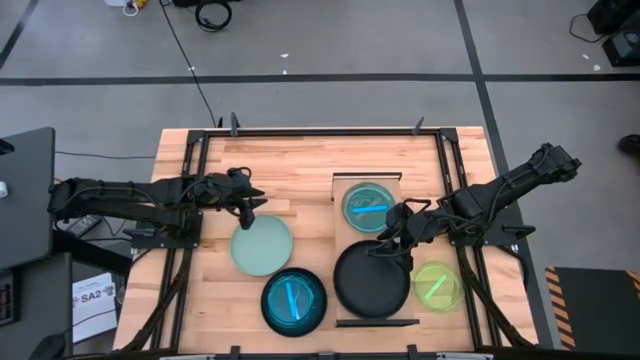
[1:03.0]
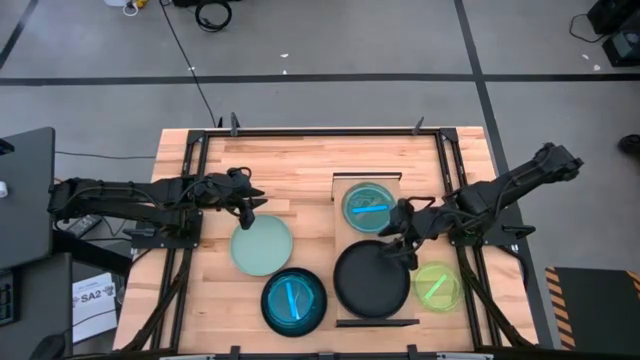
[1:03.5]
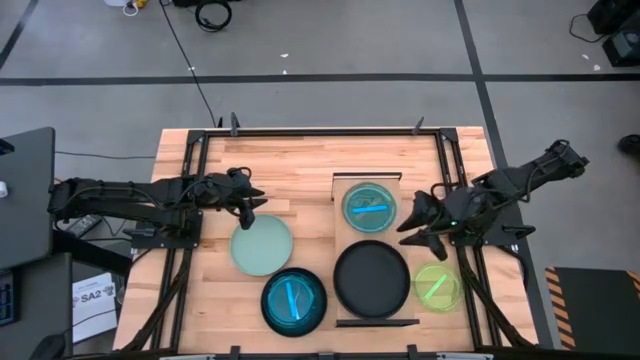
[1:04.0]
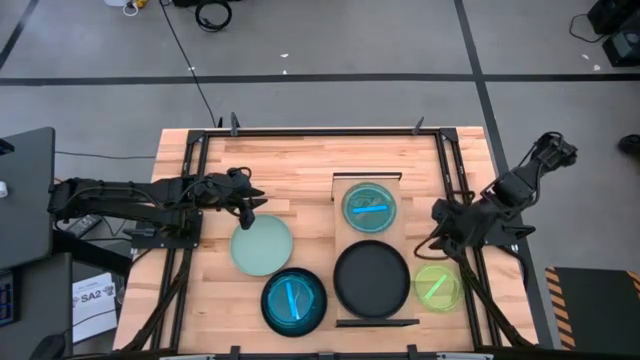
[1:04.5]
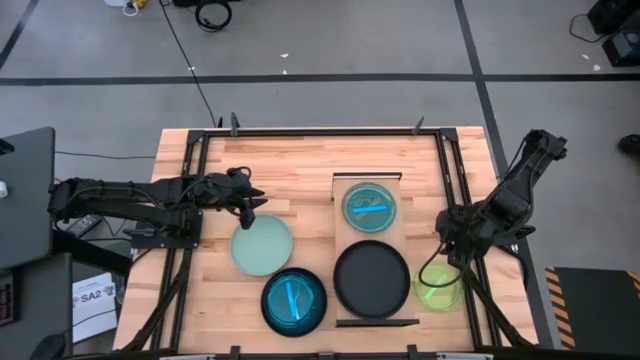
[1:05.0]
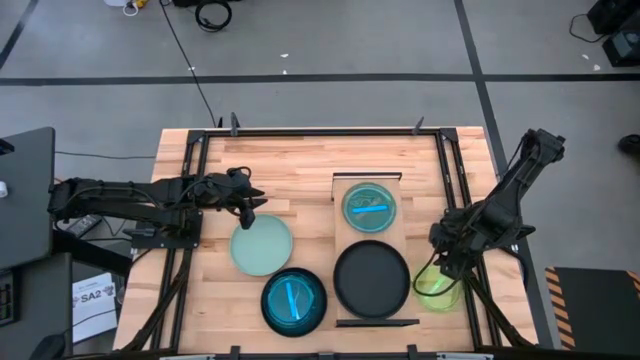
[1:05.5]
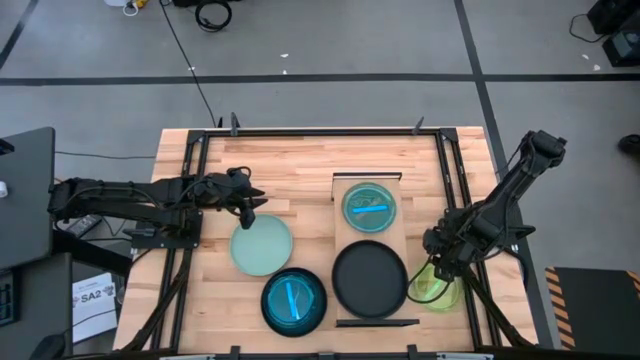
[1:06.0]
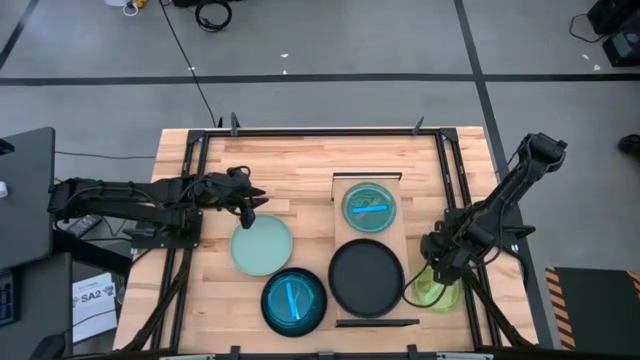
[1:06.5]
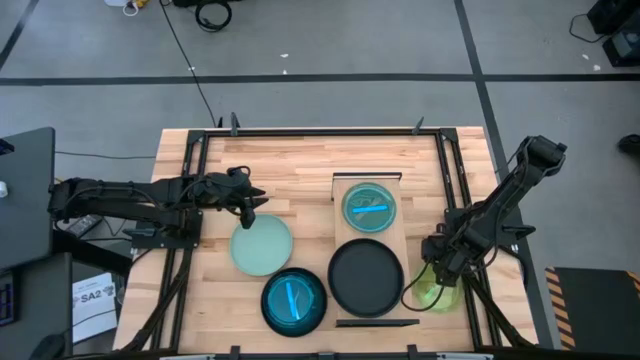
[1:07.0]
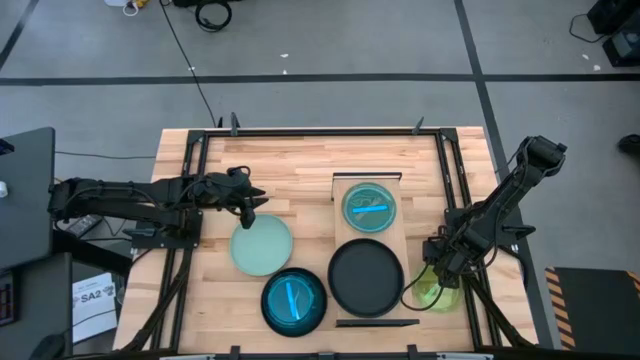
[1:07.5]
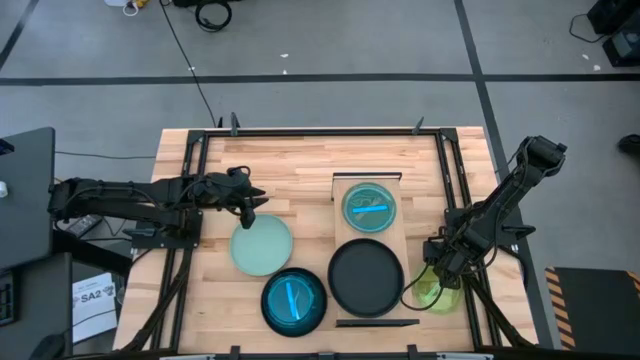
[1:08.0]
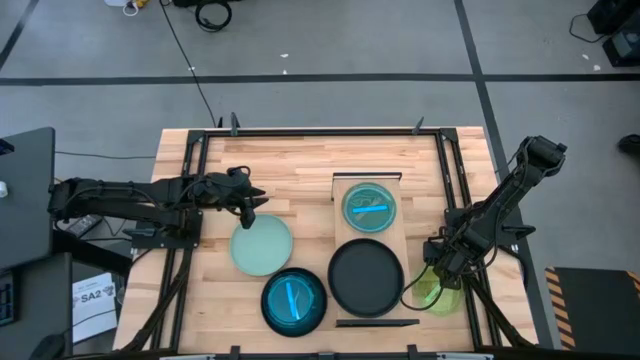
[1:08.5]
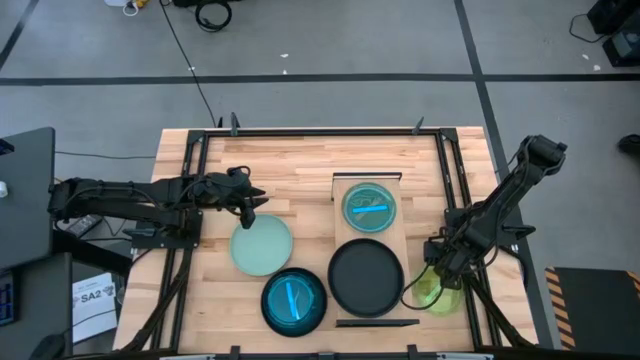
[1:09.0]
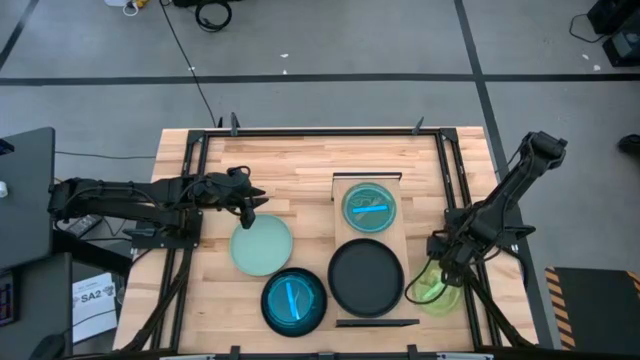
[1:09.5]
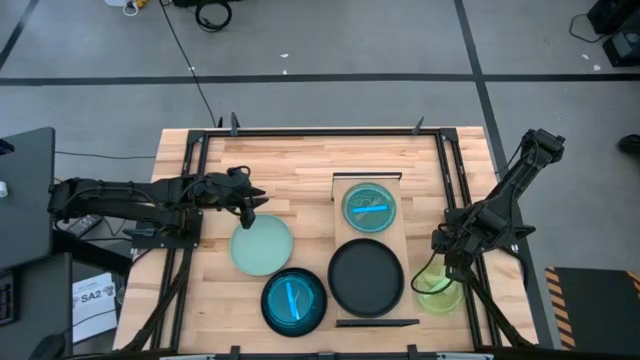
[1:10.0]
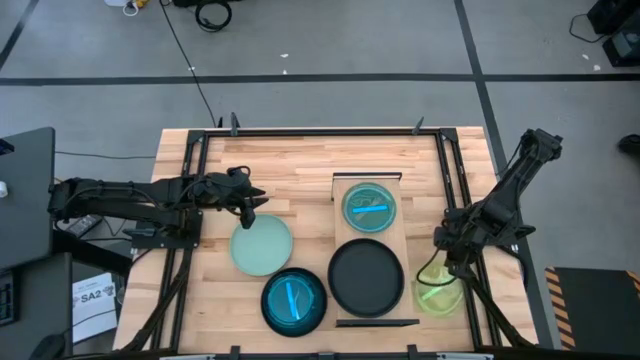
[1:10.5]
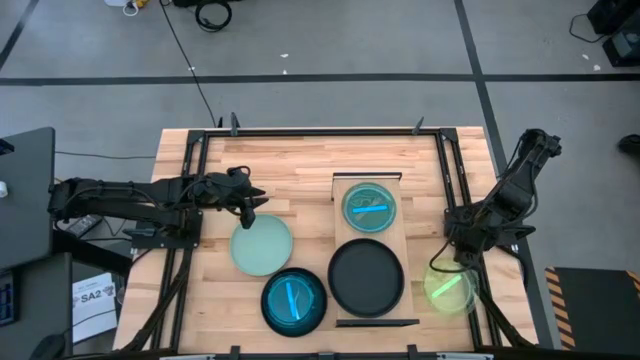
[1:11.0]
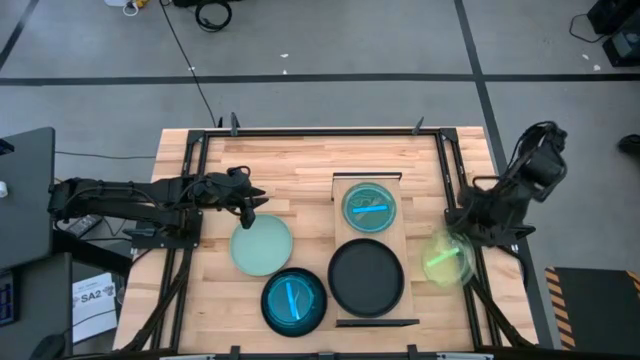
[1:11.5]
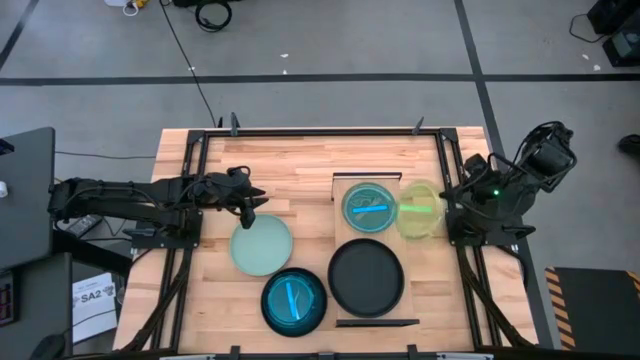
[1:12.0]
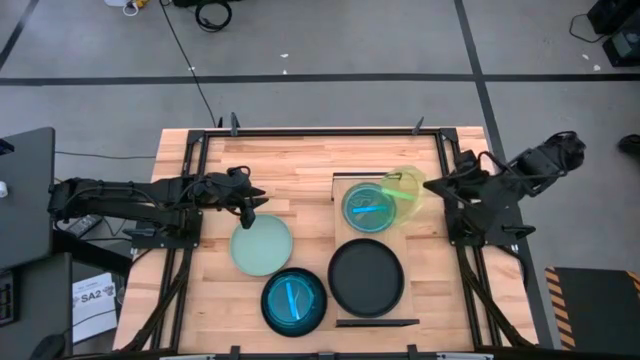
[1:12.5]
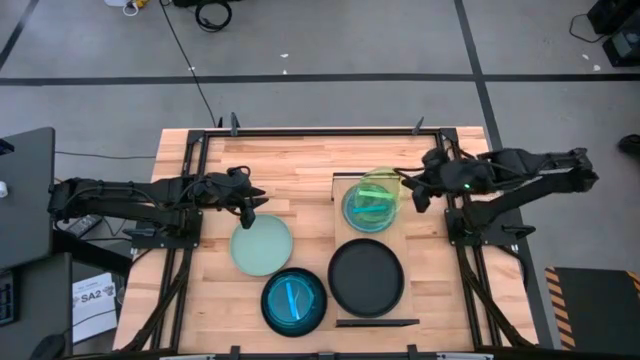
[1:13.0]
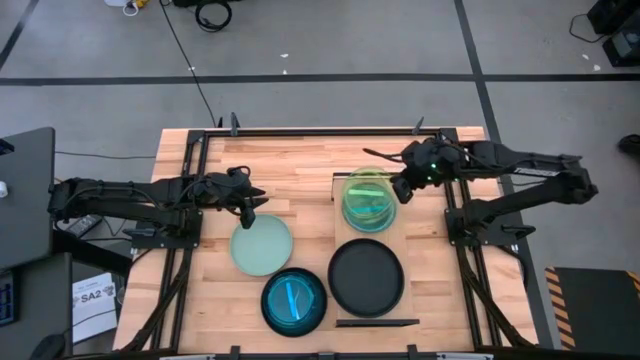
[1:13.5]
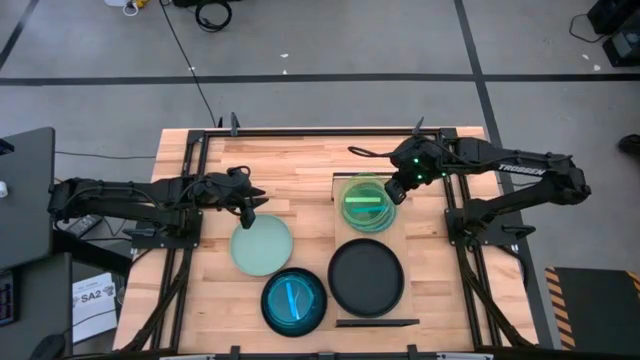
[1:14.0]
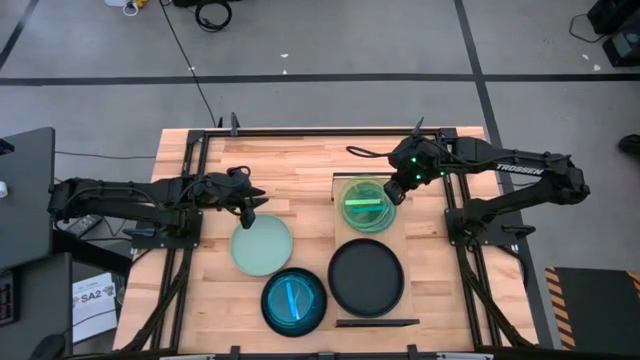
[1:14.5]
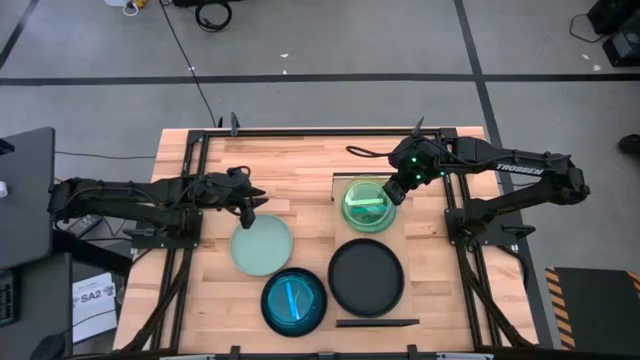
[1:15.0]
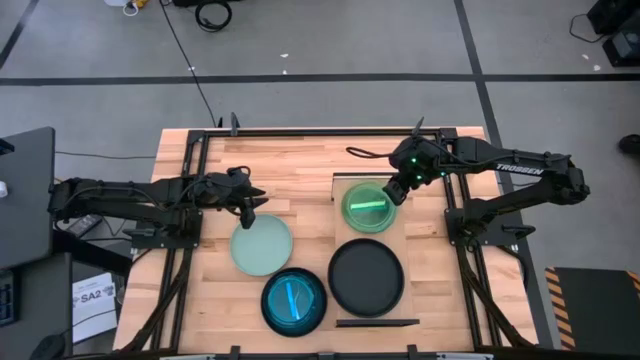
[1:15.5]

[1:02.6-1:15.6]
Task: Place and stack plates onto a shelf
Put the green plate on top of the blue plate on the shelf
